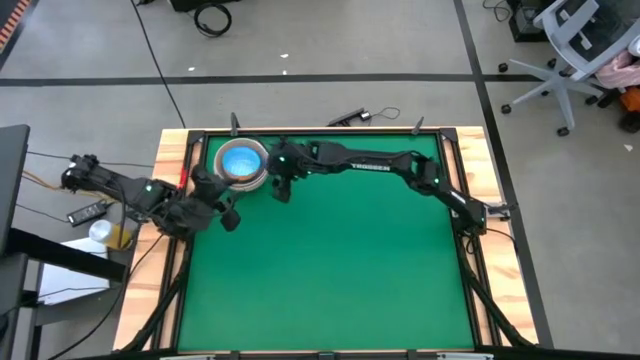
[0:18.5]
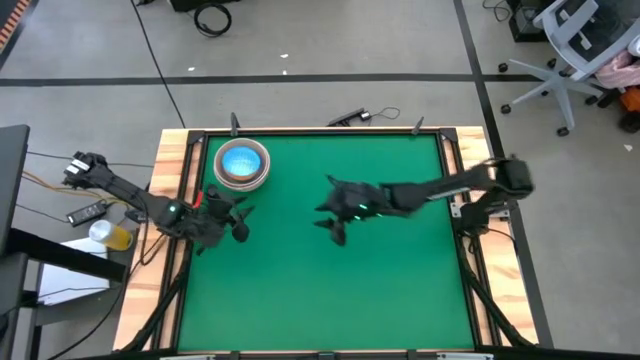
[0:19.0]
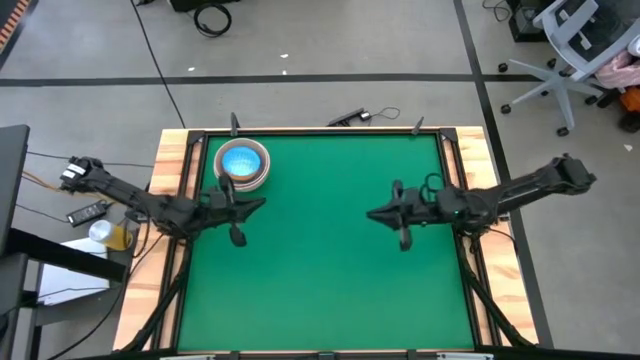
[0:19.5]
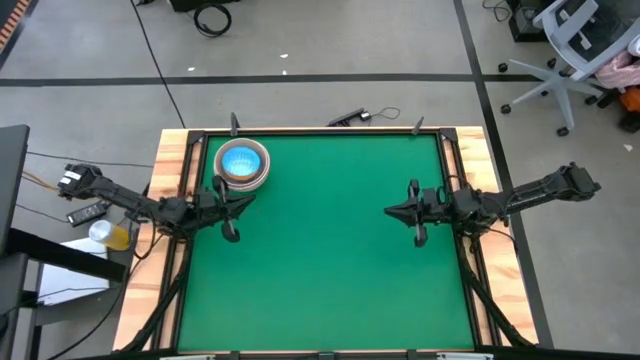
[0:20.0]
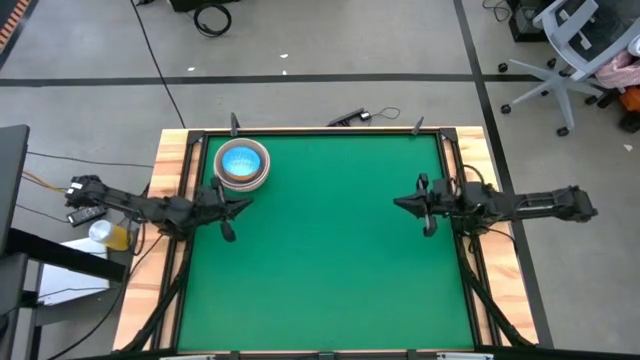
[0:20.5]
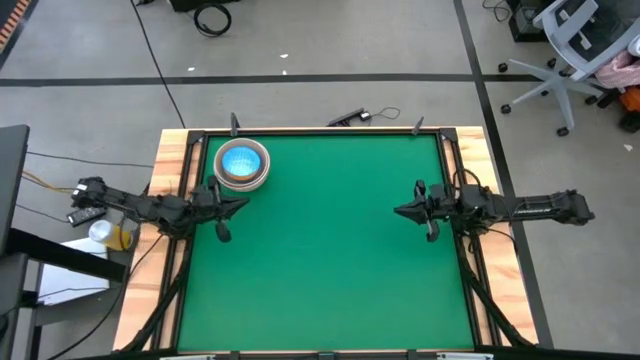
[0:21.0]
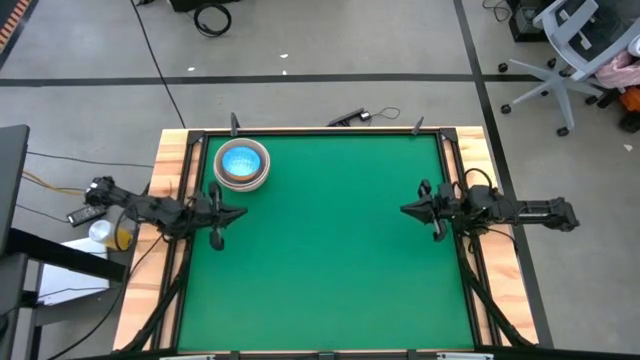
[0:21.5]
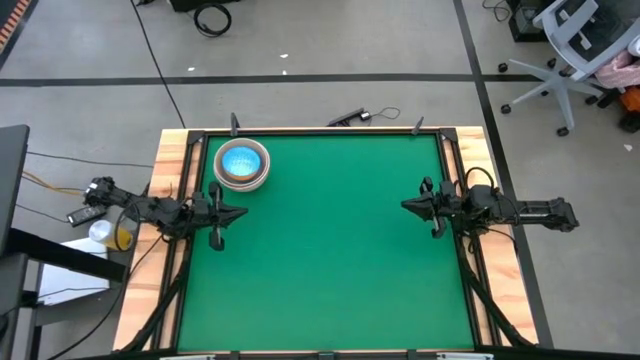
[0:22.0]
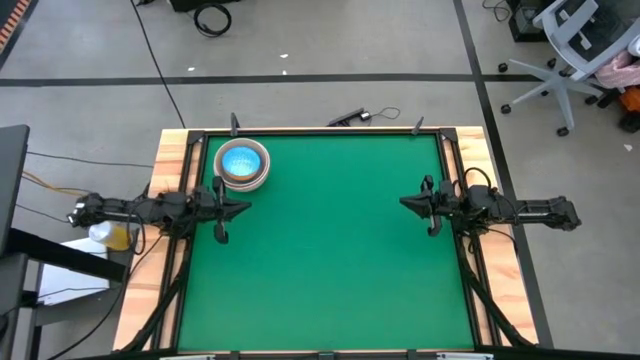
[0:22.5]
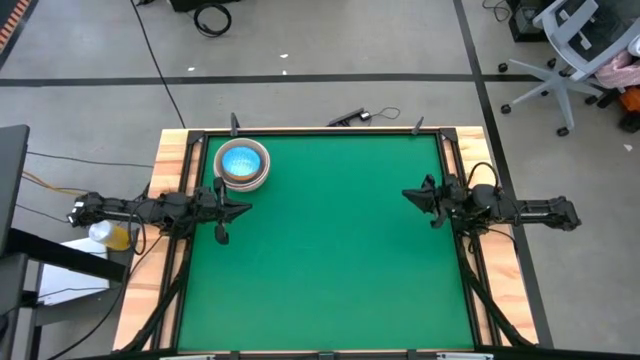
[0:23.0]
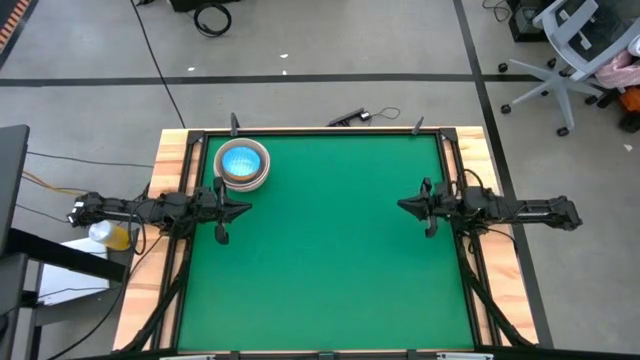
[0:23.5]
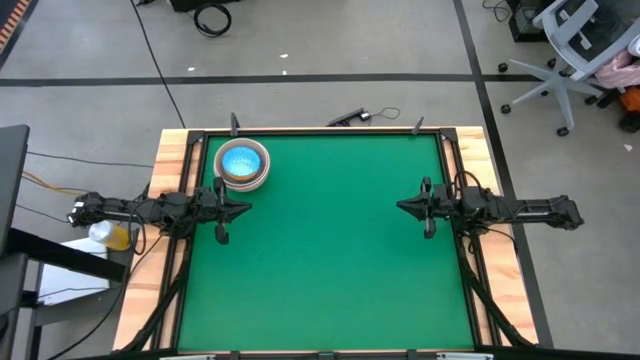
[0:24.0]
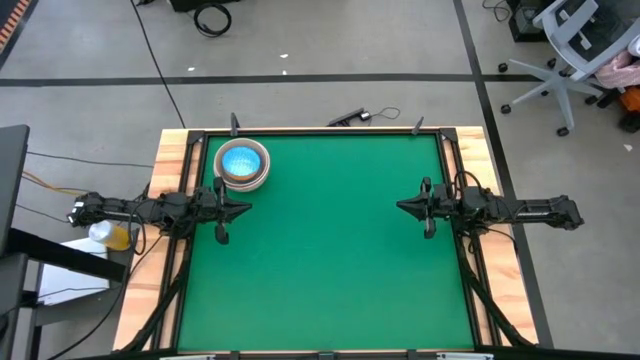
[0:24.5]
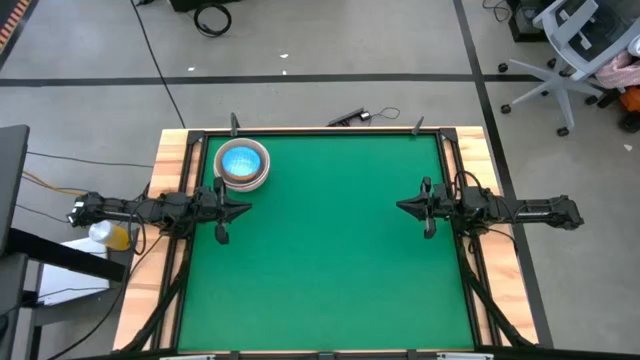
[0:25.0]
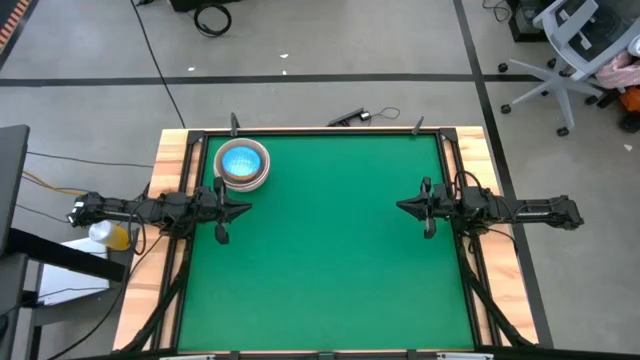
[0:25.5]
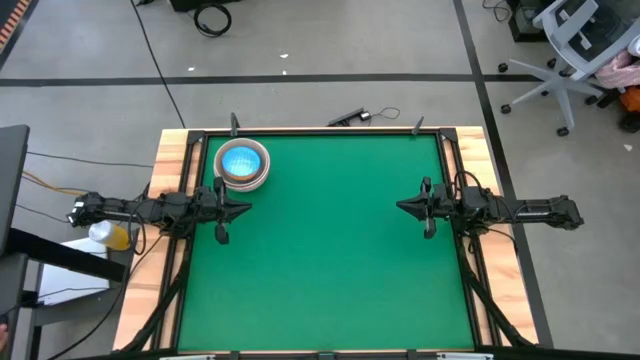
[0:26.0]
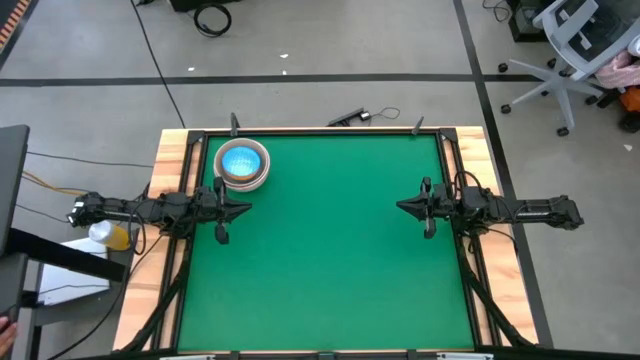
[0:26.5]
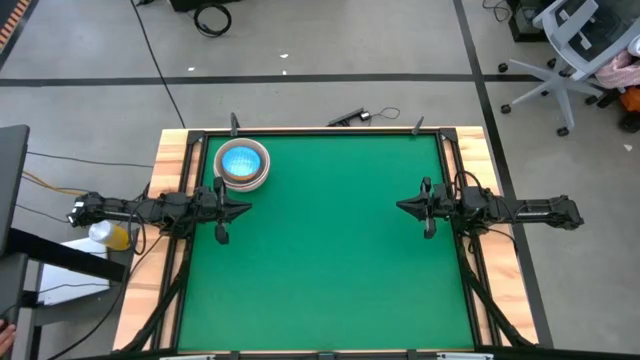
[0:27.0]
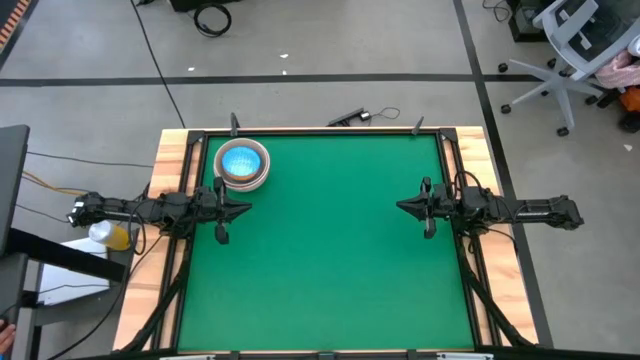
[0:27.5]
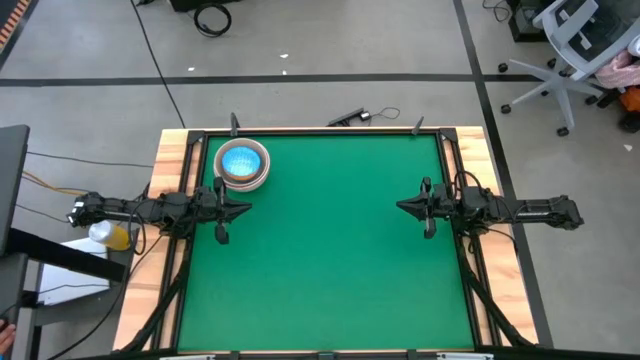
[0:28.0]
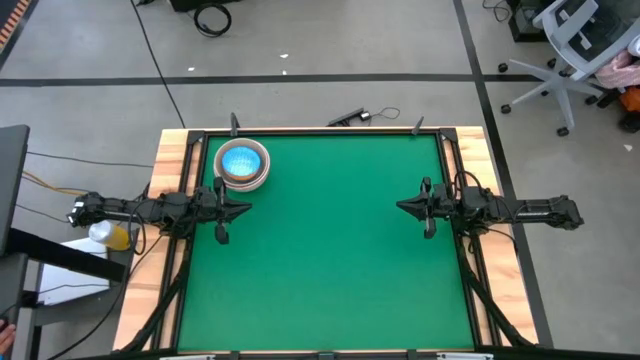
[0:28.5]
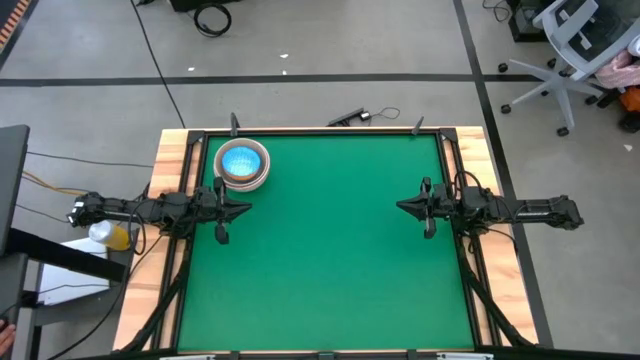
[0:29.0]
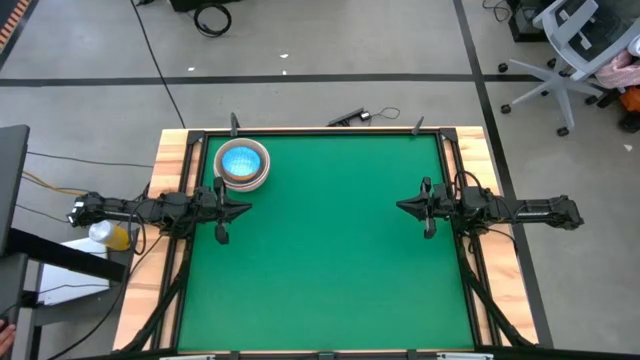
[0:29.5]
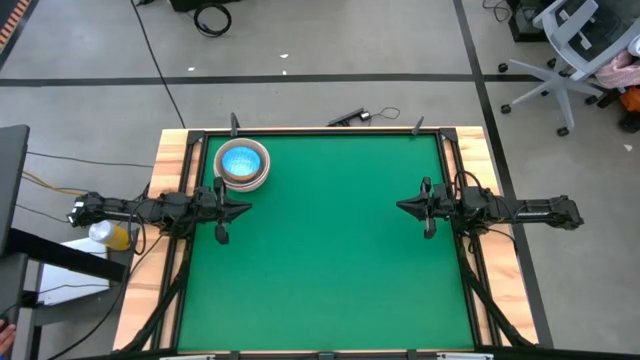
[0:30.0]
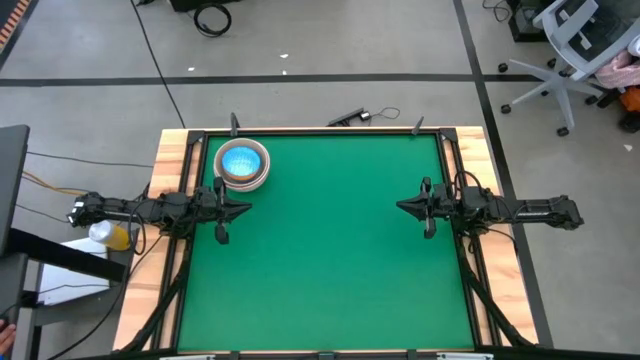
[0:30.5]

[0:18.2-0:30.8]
Return to Home Position
